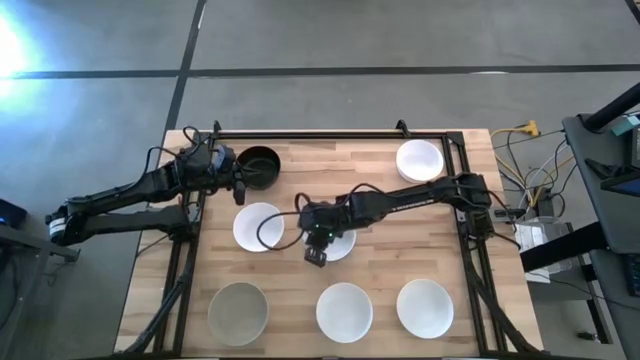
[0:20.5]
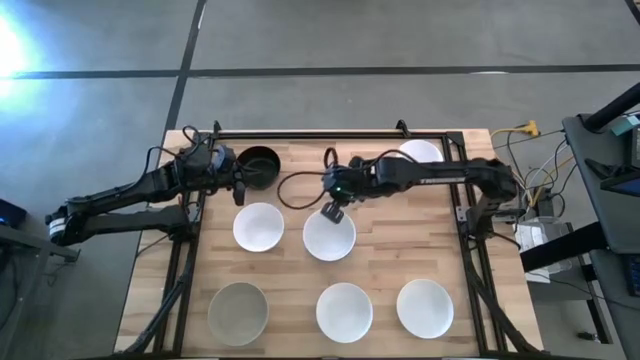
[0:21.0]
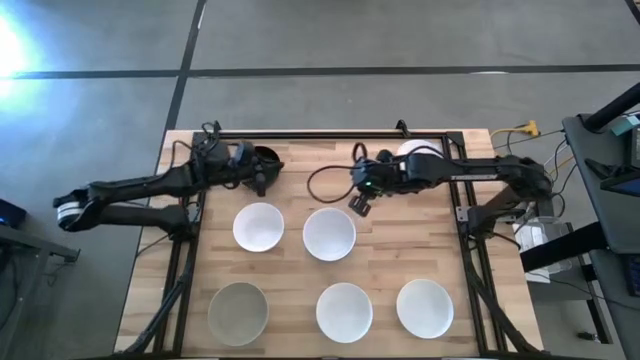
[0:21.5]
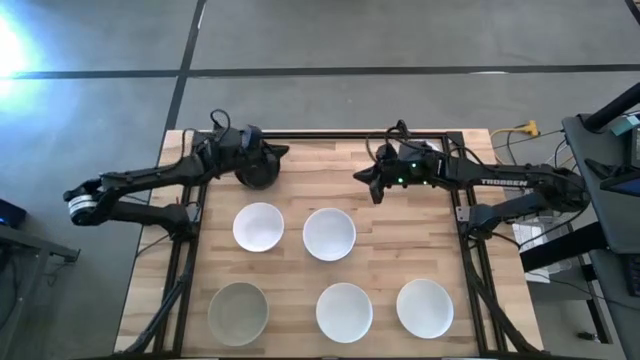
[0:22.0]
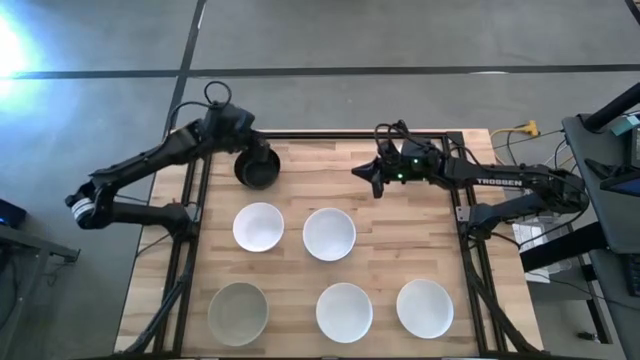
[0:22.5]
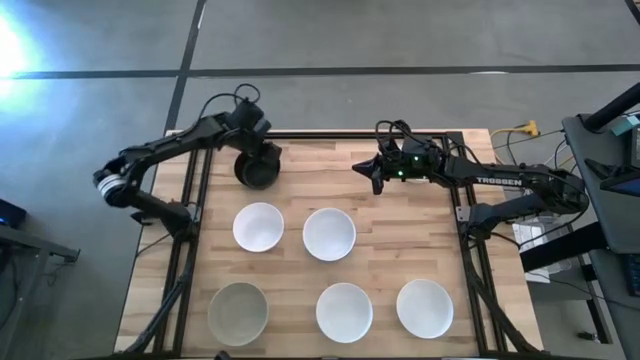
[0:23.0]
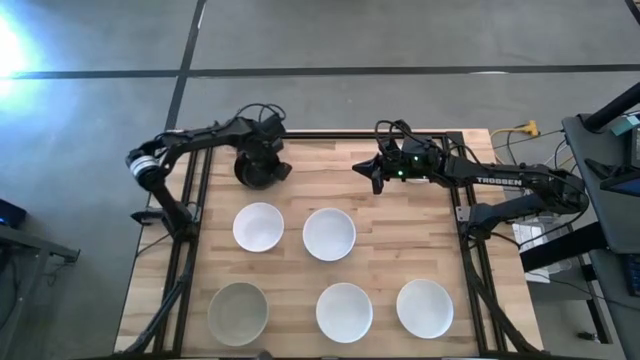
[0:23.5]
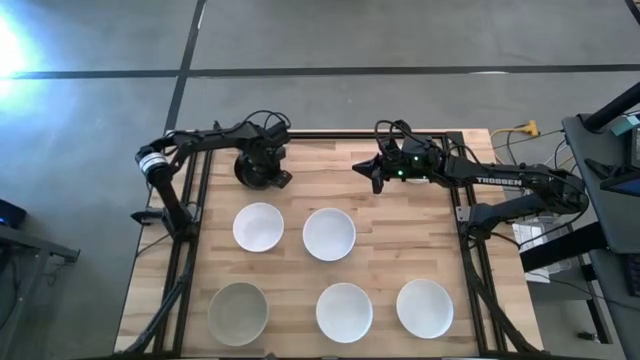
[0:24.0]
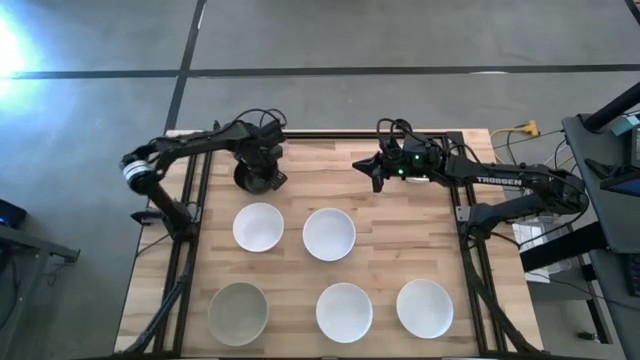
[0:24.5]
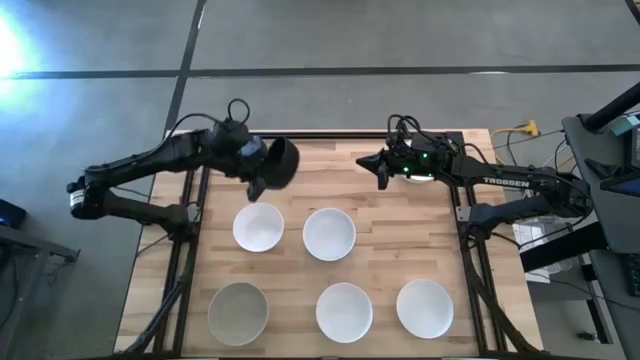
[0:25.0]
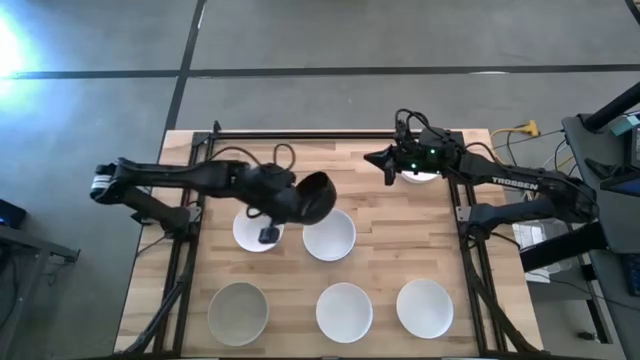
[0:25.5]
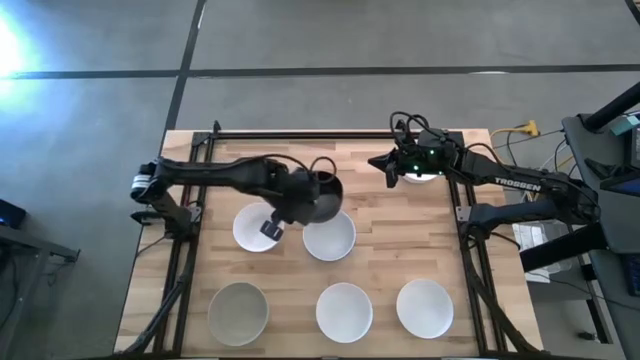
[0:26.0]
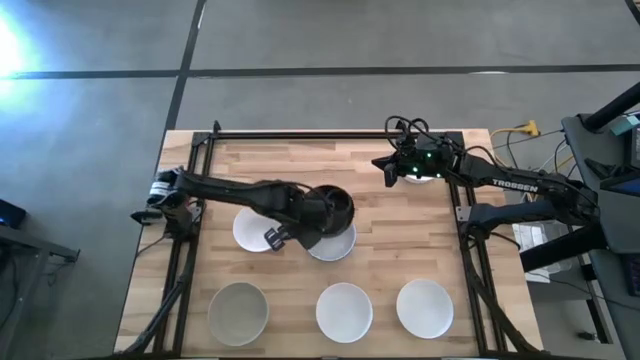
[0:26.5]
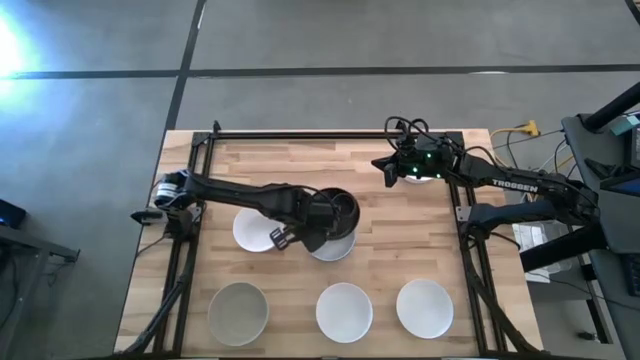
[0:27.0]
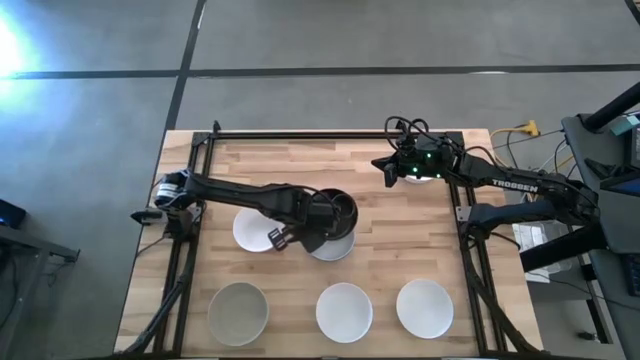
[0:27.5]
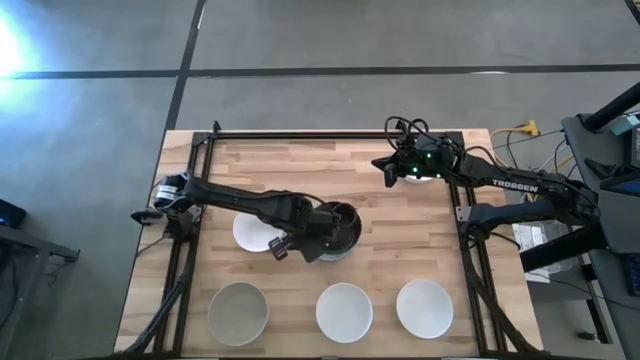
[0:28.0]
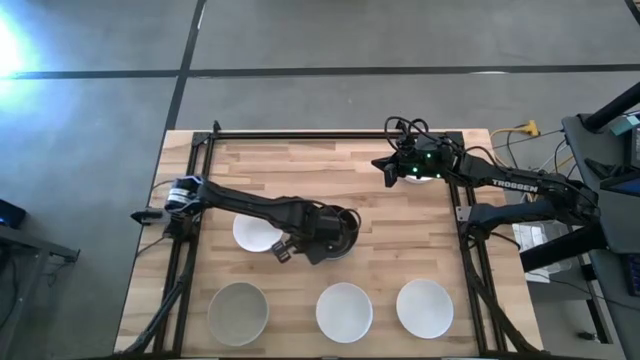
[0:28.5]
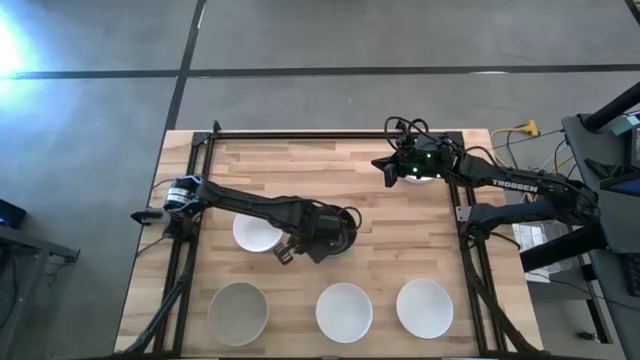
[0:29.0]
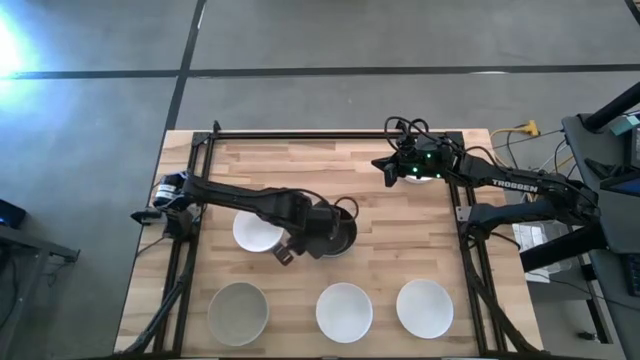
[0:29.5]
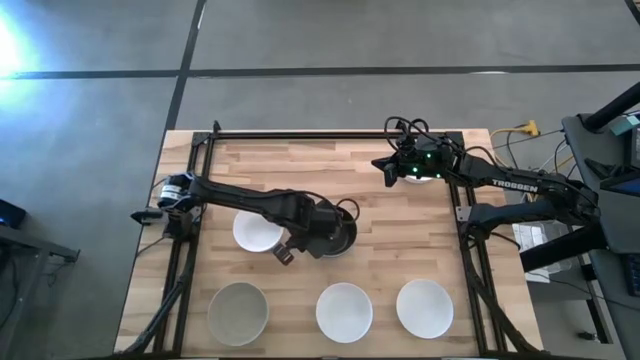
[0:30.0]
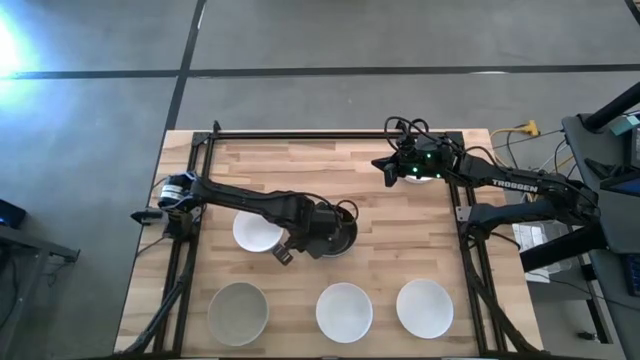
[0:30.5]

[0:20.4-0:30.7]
Task: Nest bowls inside each other
Stack the black bowl on top of the white bowl

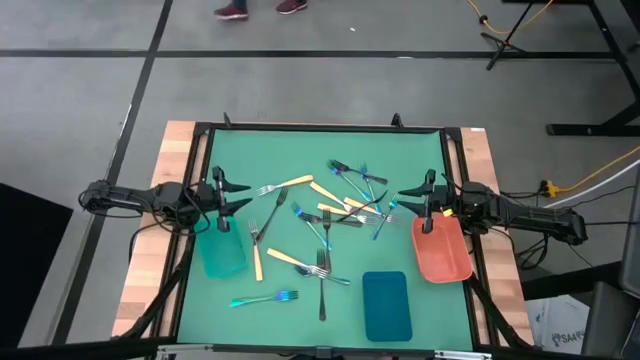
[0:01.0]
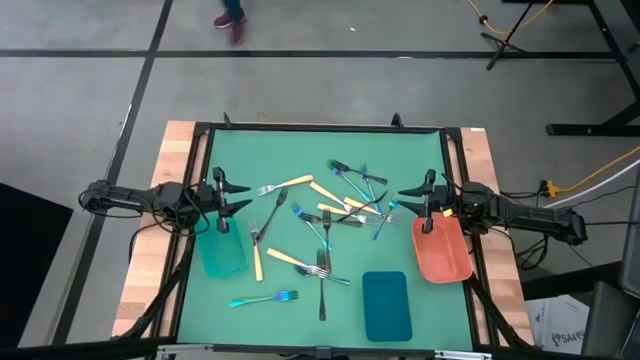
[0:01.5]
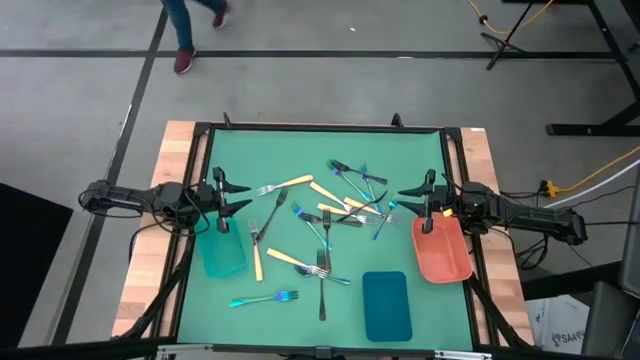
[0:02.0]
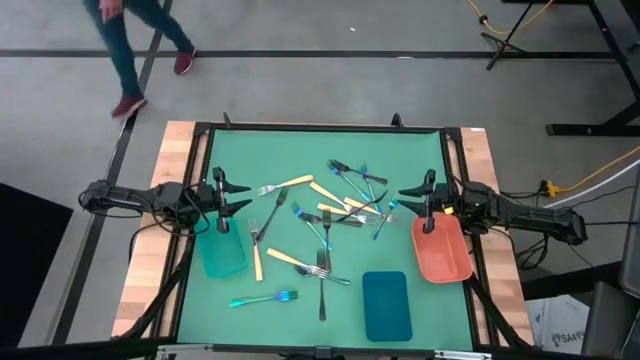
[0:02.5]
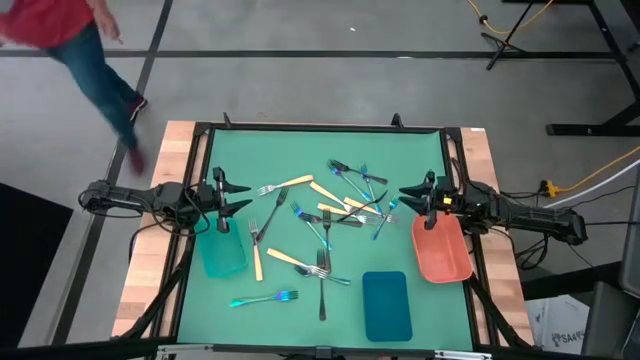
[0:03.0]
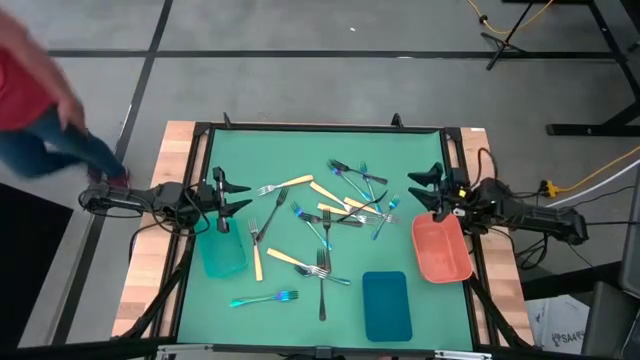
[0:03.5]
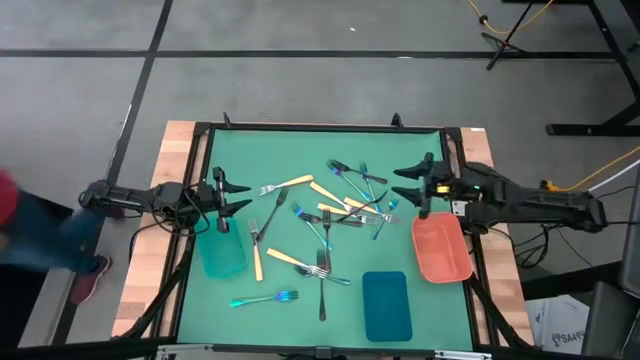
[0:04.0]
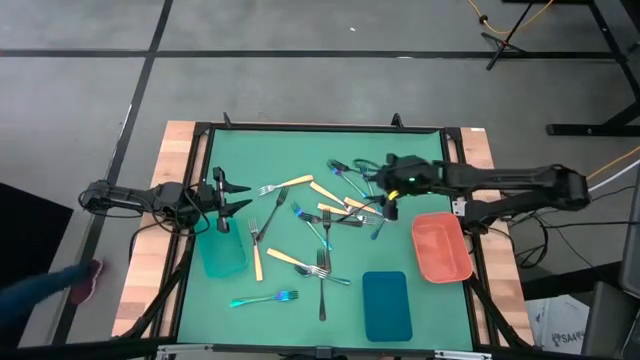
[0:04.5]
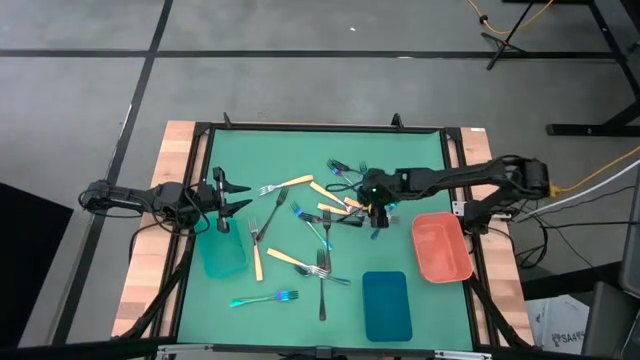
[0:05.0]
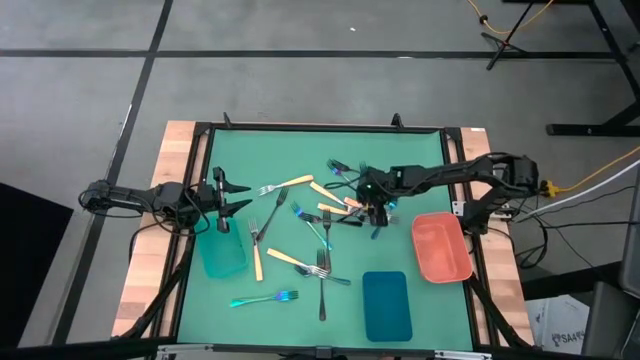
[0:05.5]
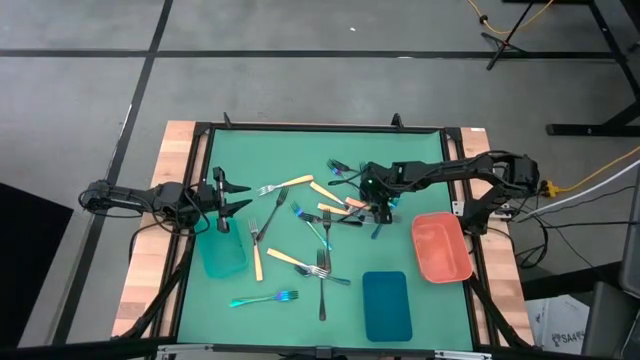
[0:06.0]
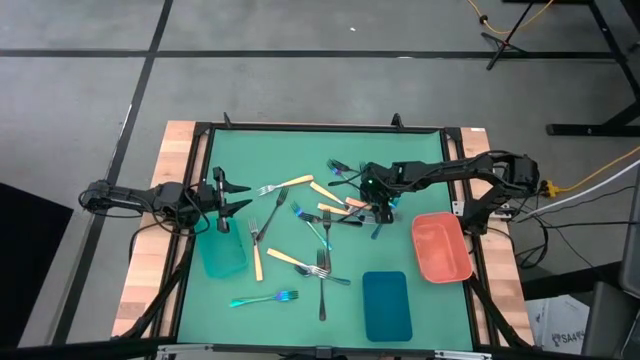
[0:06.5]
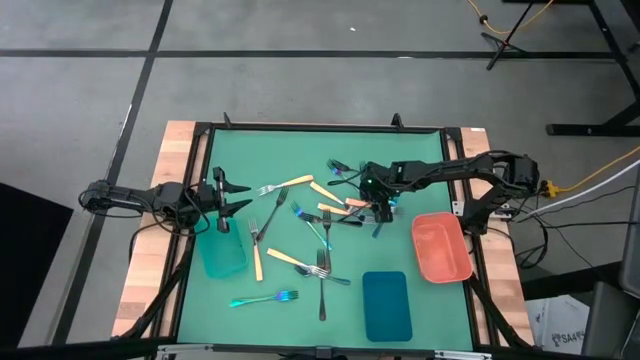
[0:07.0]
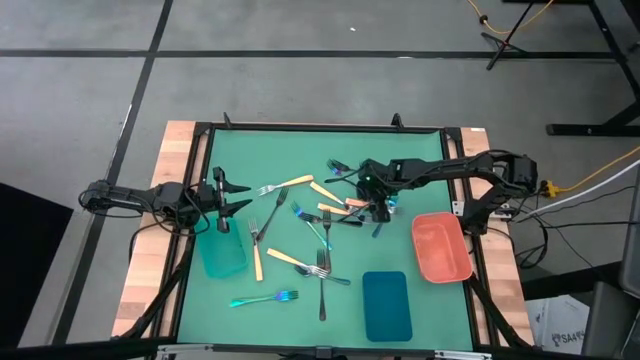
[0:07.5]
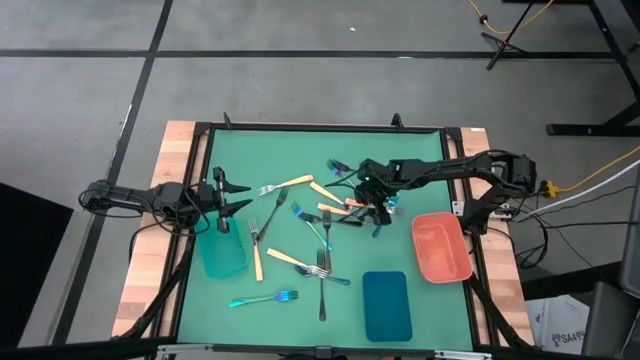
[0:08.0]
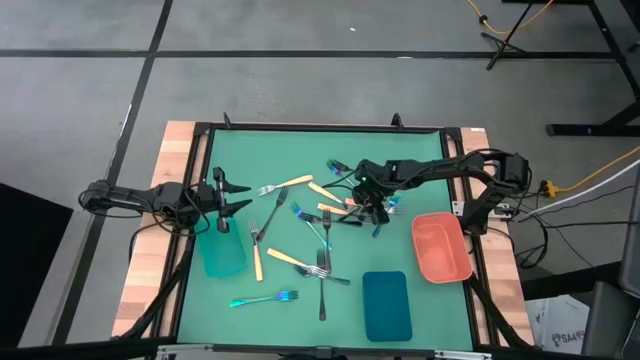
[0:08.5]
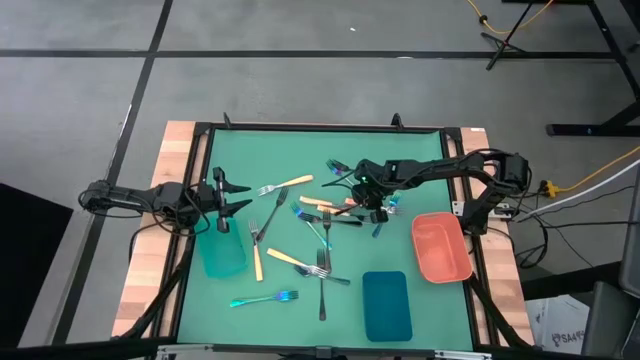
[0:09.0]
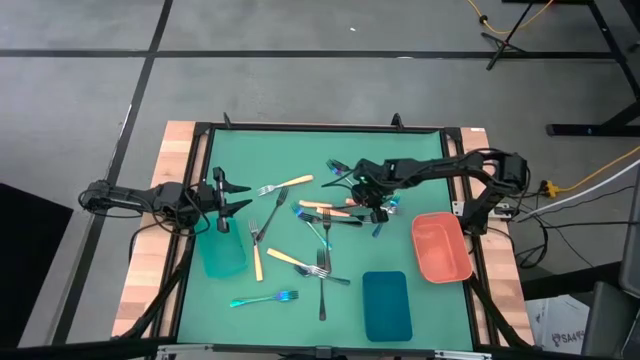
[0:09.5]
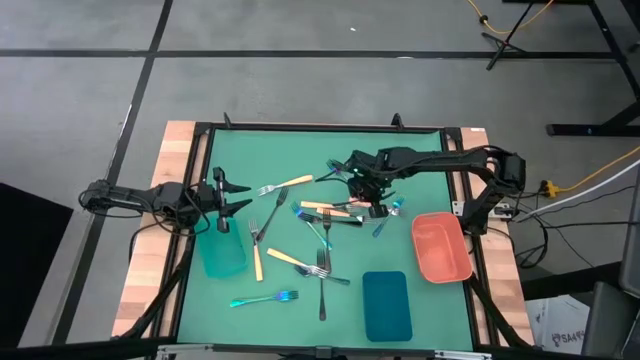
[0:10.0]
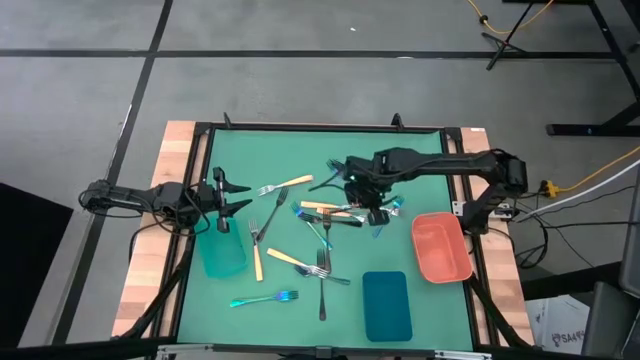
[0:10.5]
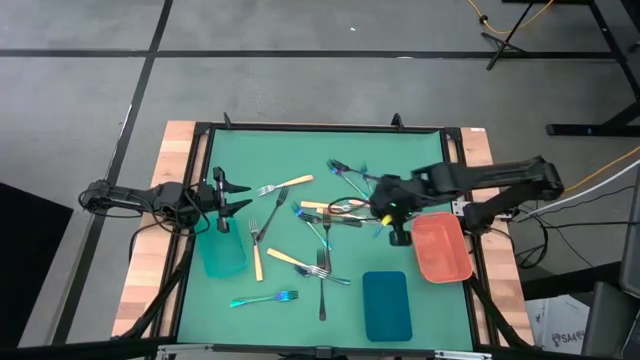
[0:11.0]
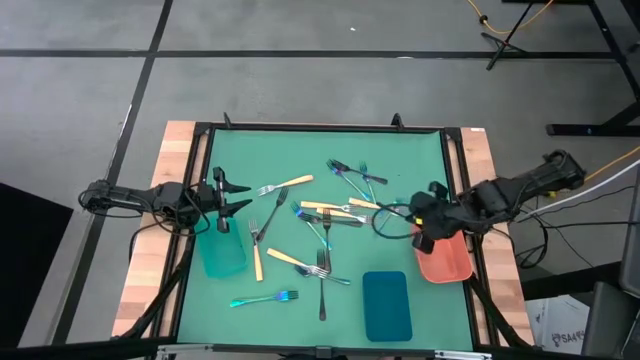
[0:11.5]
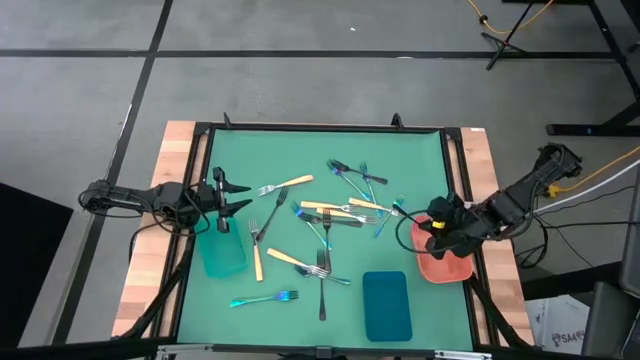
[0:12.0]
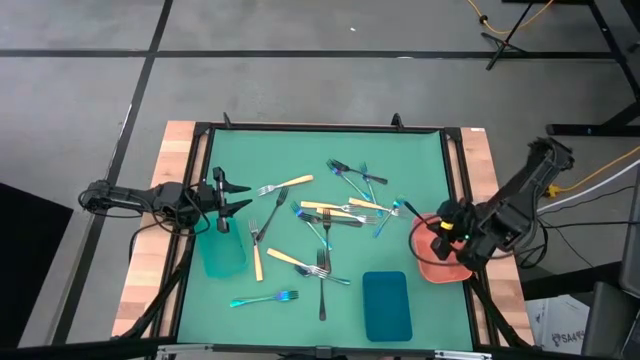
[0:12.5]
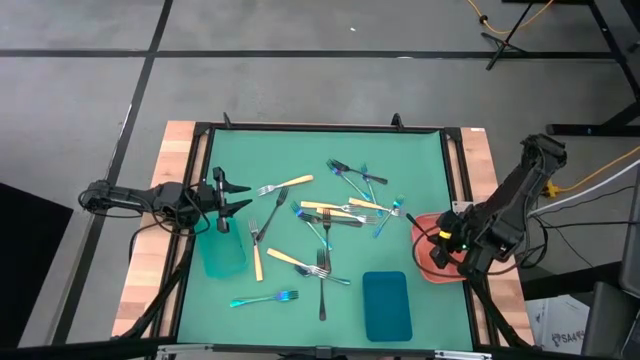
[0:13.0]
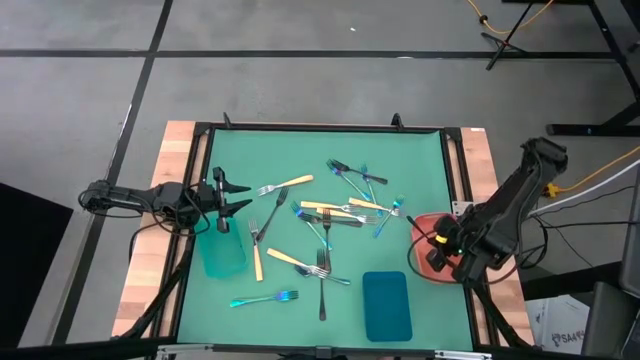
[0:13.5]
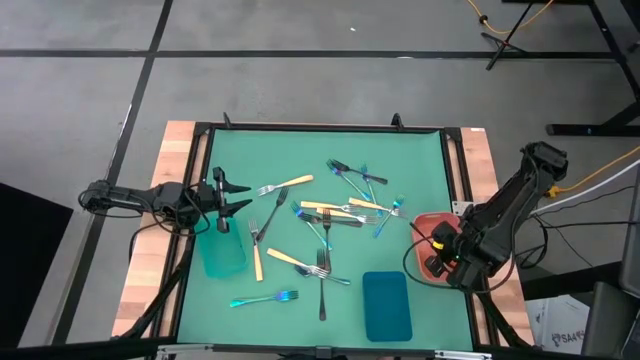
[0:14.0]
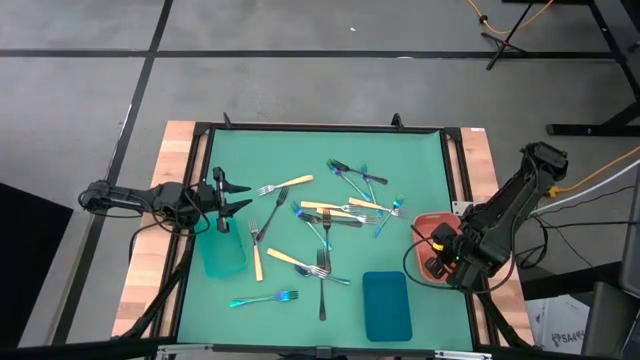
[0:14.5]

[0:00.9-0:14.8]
Task: Sort silverware by color (type)
Put the black fork into the orange bin
